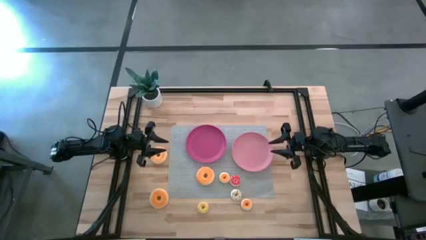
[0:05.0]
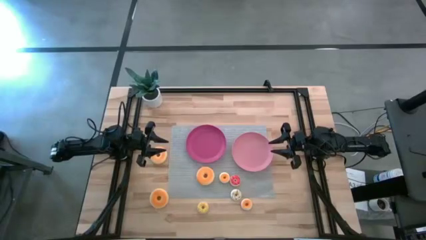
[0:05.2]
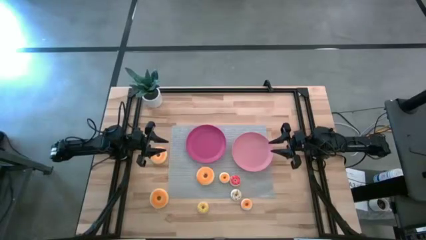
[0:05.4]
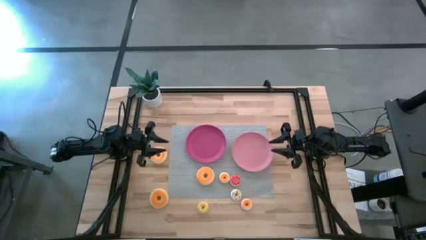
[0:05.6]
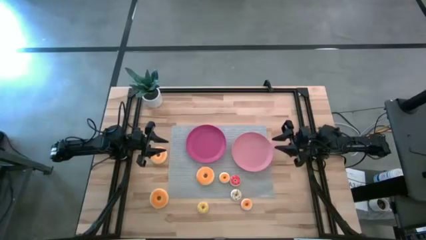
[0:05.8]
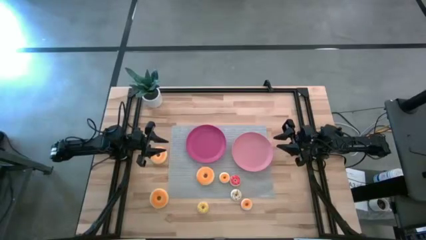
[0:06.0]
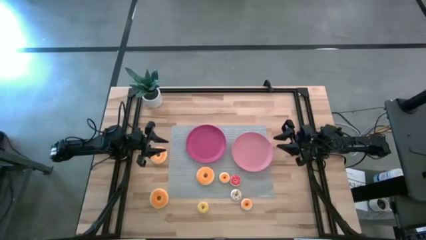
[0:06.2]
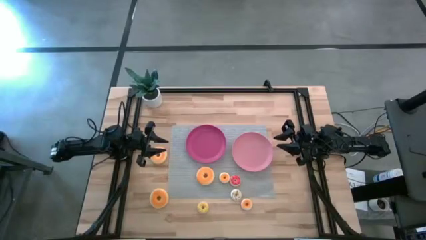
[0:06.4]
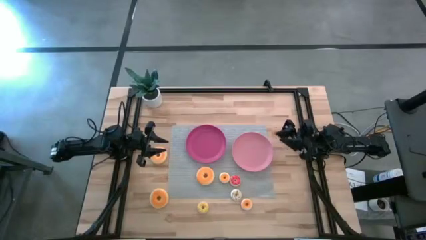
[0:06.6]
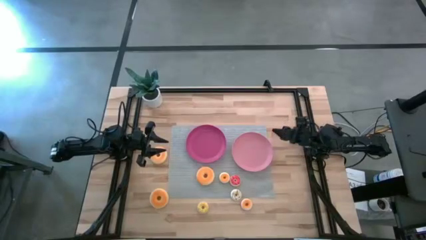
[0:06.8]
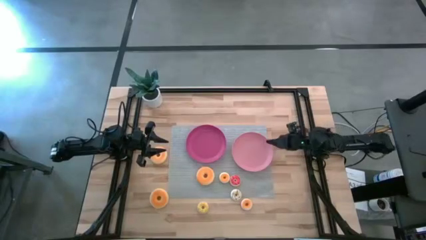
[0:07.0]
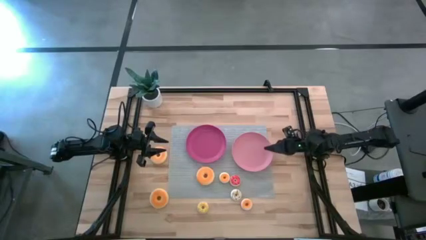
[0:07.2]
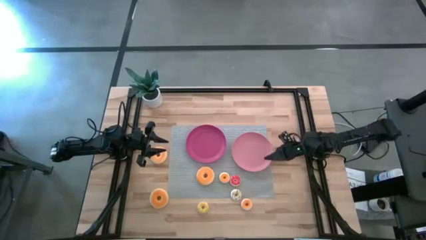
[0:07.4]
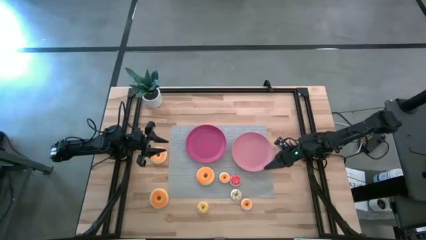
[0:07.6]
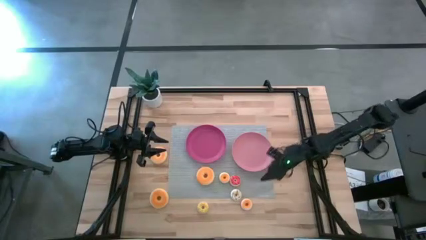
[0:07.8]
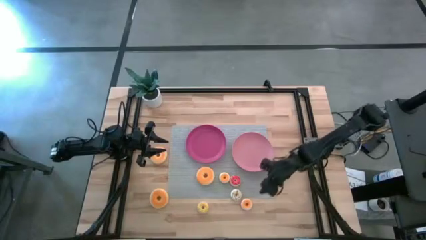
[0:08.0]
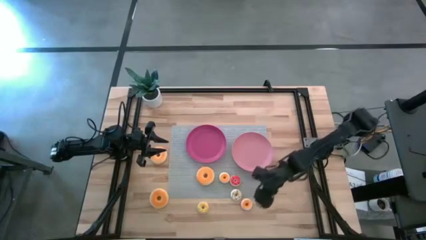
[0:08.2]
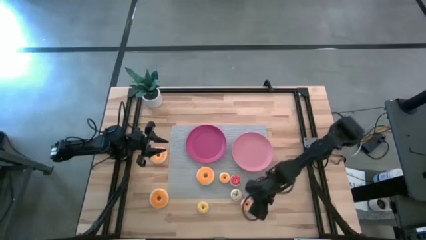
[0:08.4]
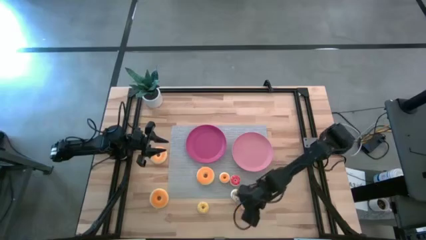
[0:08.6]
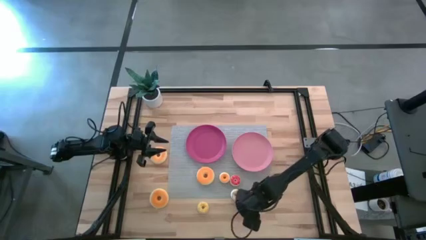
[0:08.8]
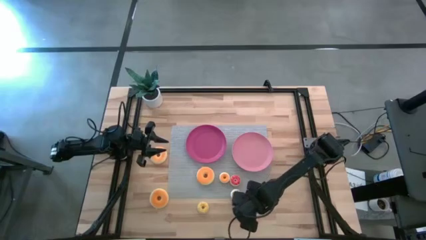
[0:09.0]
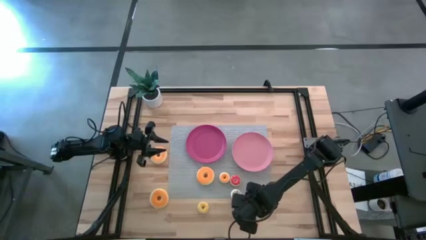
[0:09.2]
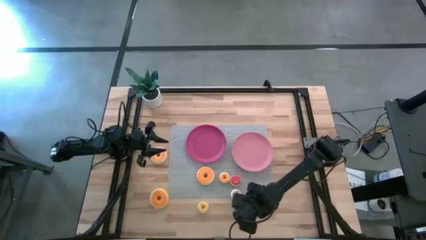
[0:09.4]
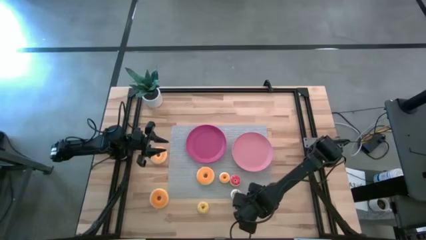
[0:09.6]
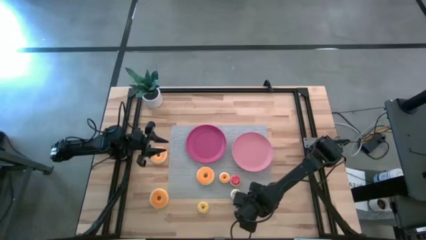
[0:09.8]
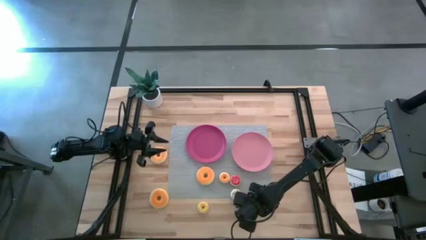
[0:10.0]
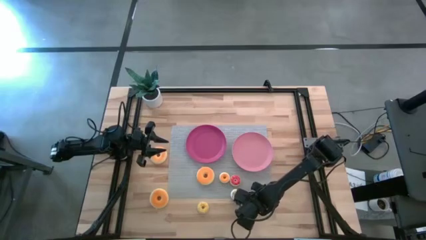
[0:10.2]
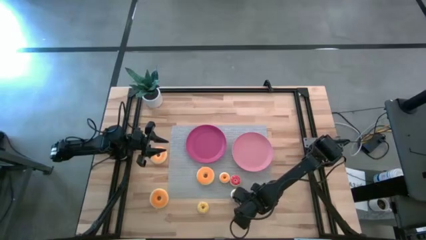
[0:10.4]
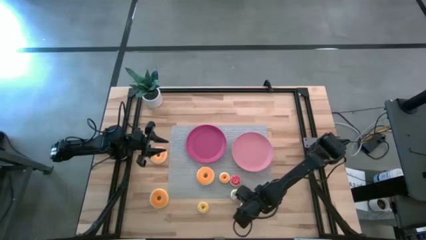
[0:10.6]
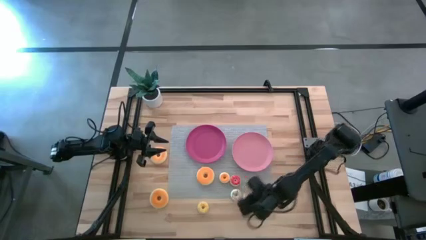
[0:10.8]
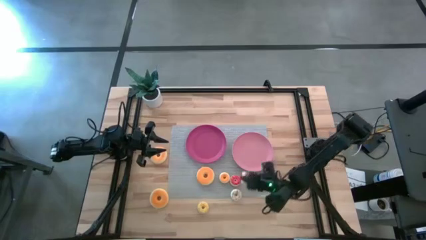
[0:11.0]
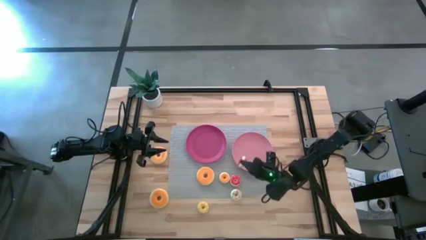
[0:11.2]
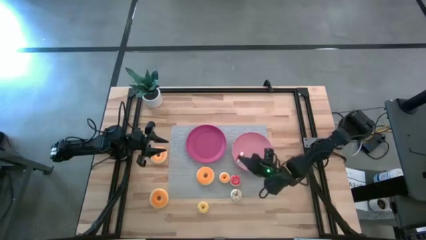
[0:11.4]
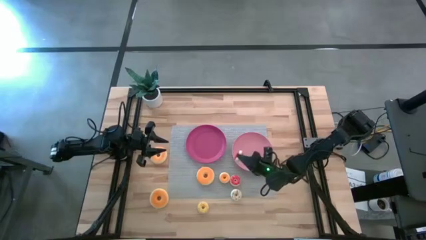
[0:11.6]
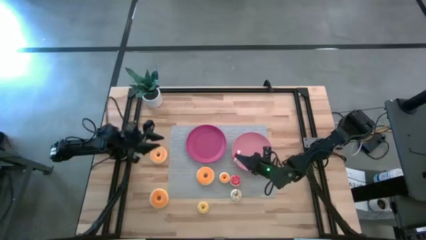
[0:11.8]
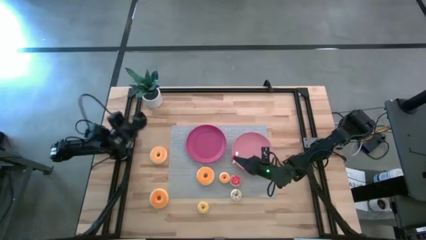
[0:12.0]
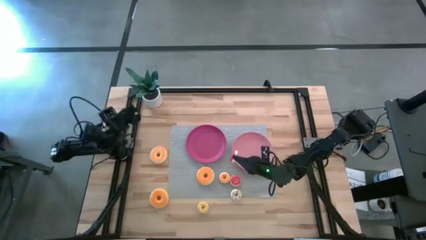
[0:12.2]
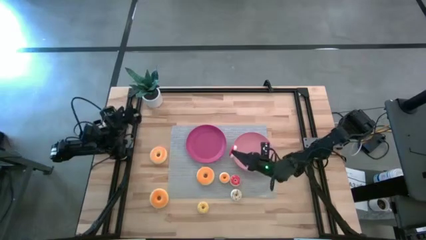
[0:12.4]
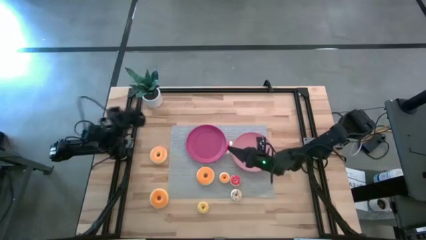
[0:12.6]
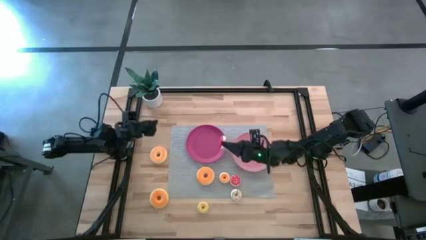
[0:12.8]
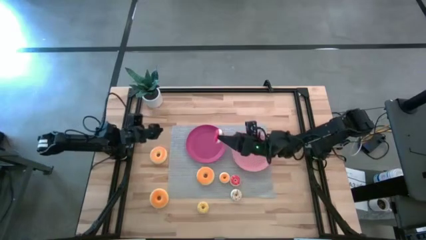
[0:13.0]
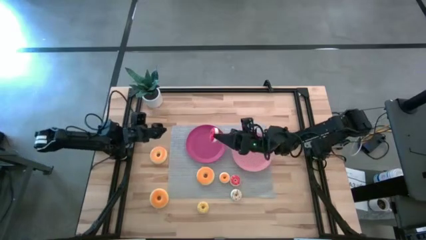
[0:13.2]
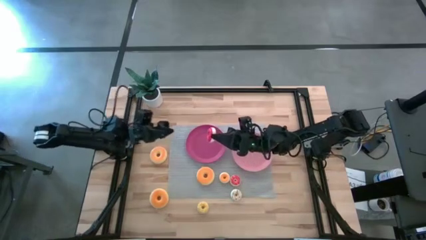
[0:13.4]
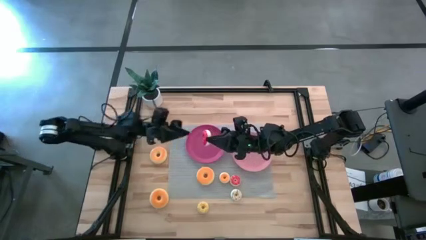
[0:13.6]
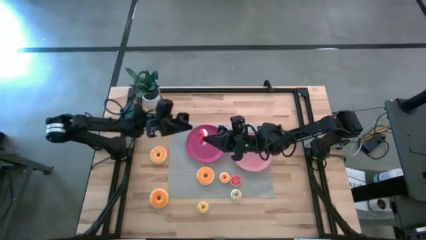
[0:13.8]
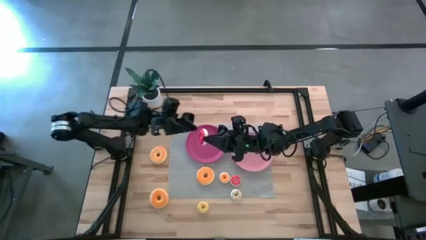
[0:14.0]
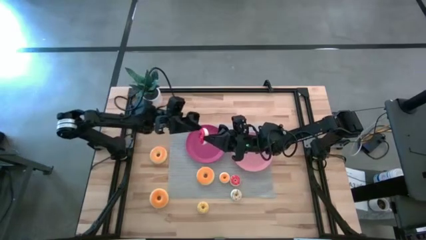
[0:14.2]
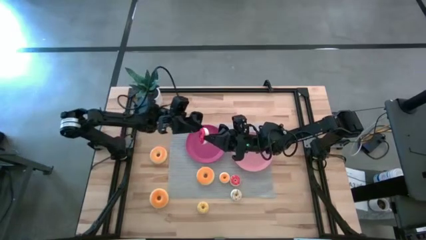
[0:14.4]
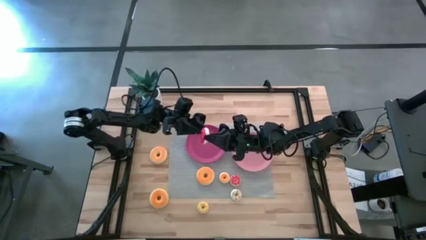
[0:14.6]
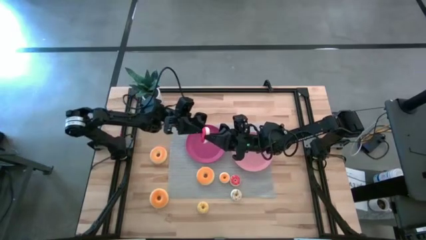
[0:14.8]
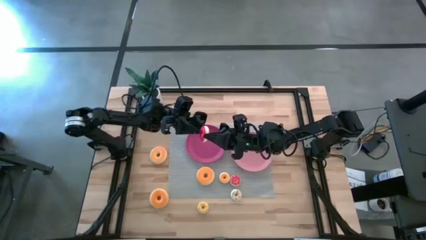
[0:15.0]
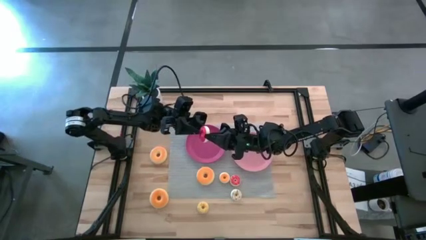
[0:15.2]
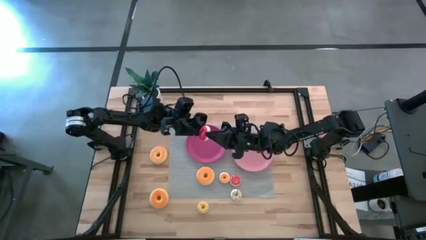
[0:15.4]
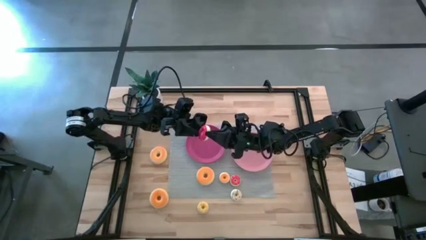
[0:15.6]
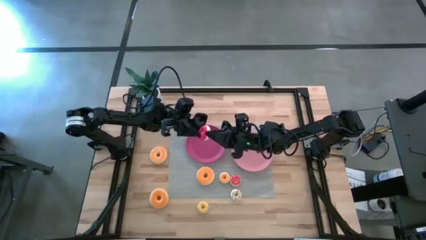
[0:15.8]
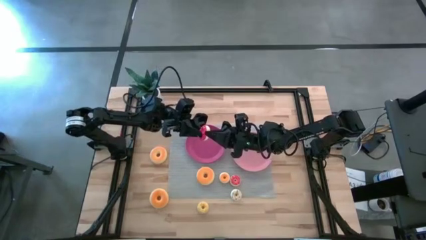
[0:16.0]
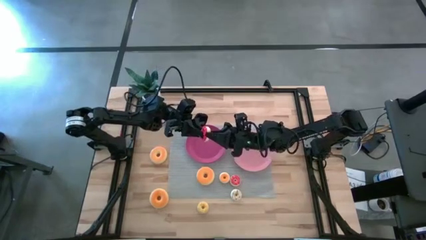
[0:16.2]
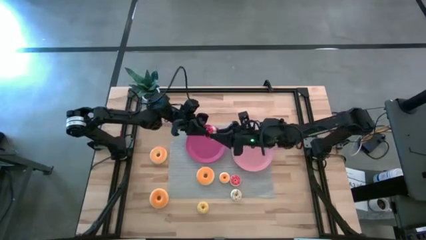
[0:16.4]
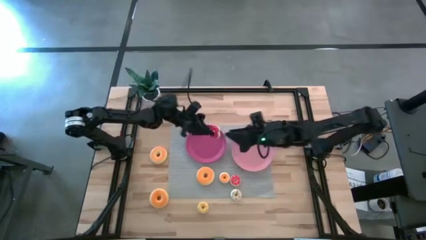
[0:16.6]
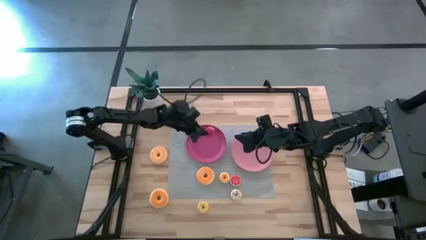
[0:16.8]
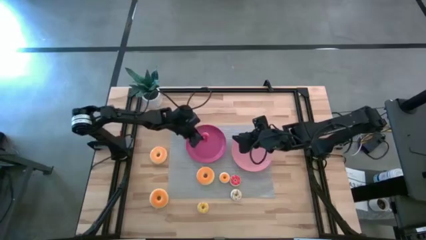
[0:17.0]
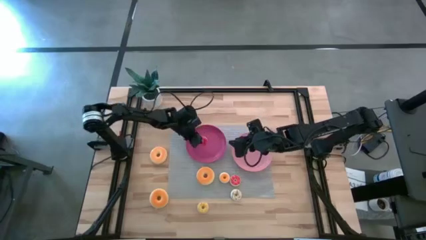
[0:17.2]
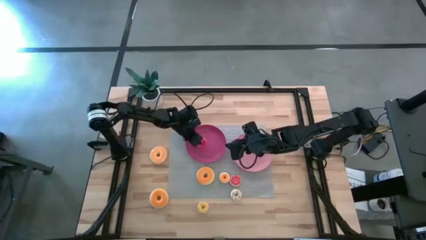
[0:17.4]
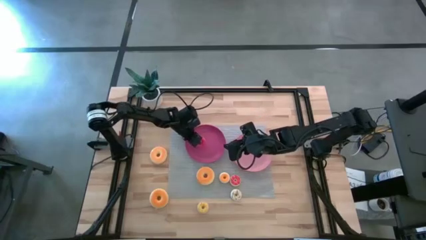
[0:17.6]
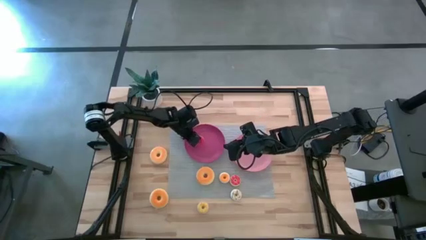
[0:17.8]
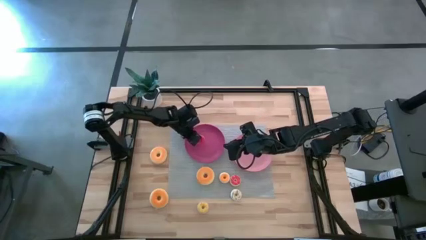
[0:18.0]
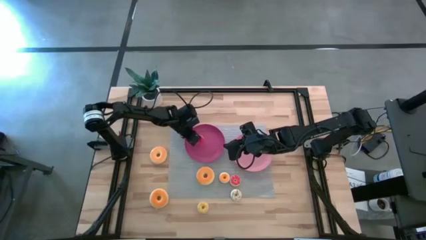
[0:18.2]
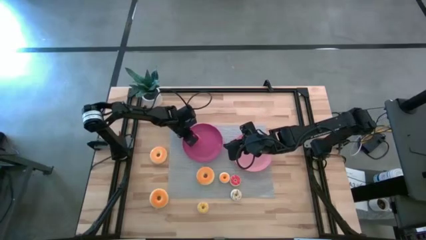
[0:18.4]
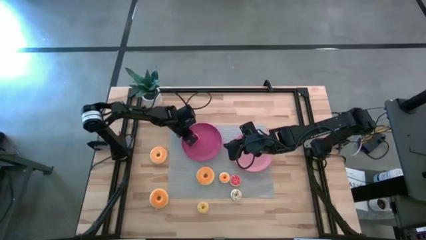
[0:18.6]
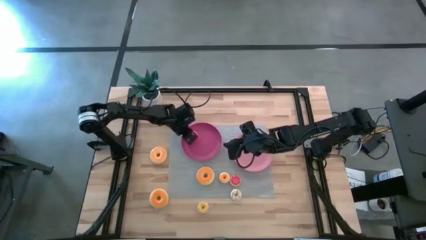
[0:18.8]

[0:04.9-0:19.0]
Task: Pick & Place donuts
Put the small red donut on the pink plate

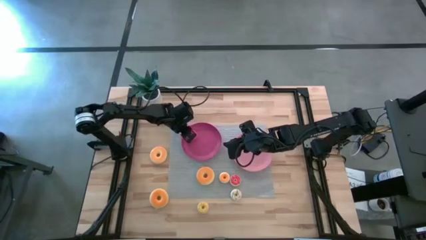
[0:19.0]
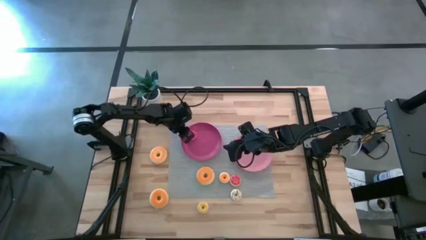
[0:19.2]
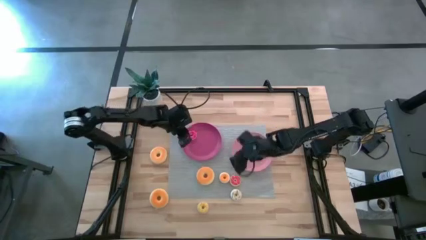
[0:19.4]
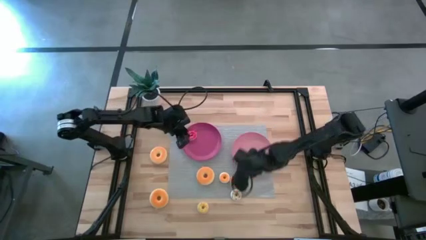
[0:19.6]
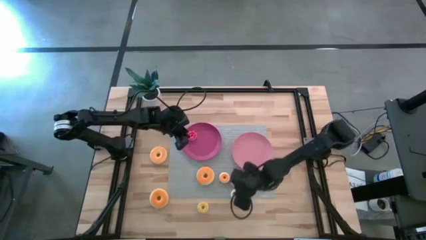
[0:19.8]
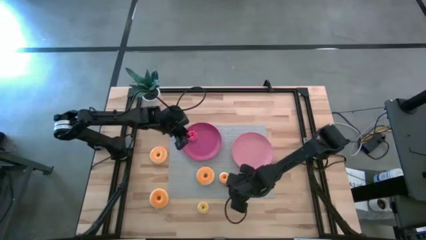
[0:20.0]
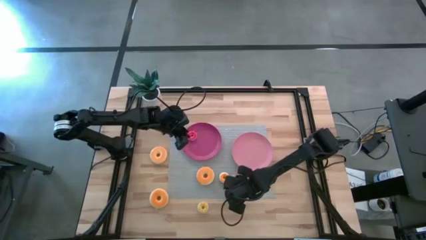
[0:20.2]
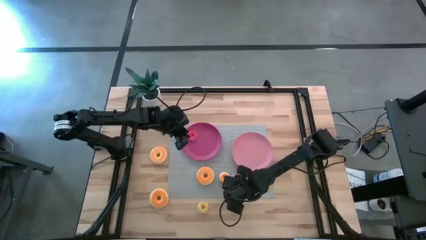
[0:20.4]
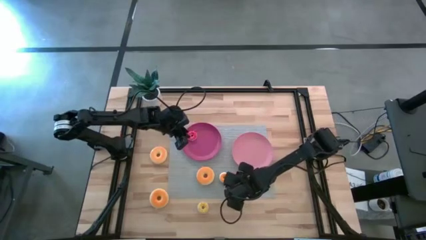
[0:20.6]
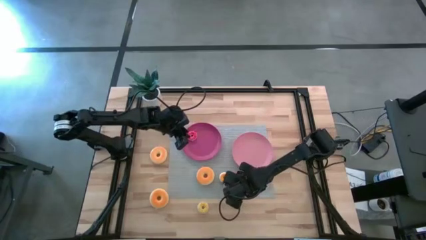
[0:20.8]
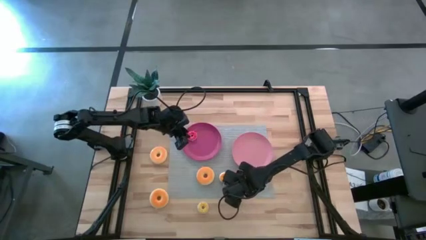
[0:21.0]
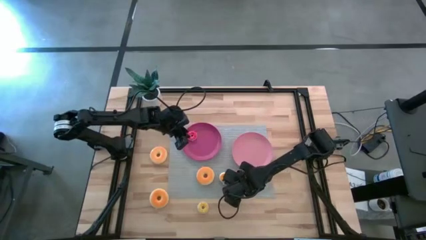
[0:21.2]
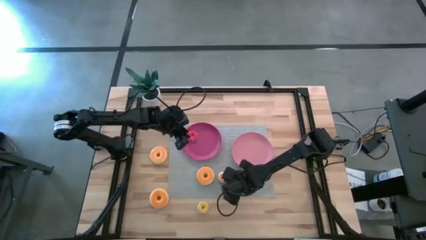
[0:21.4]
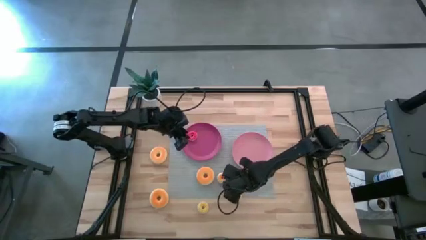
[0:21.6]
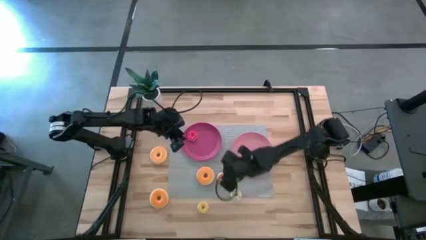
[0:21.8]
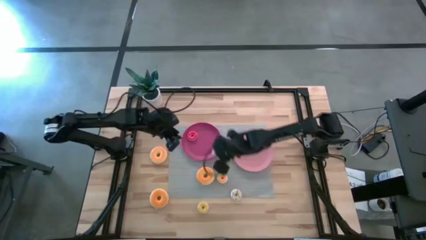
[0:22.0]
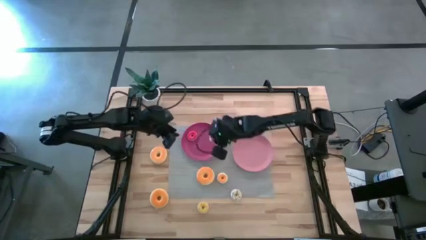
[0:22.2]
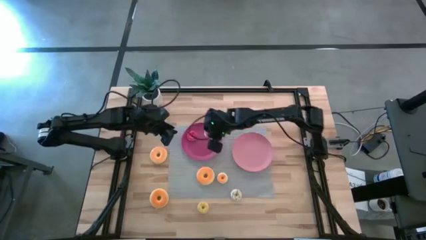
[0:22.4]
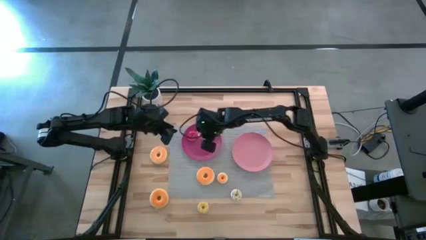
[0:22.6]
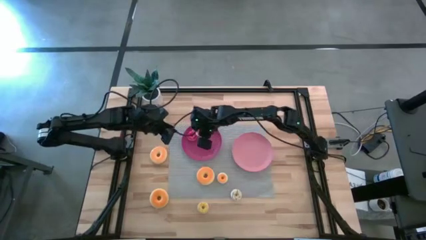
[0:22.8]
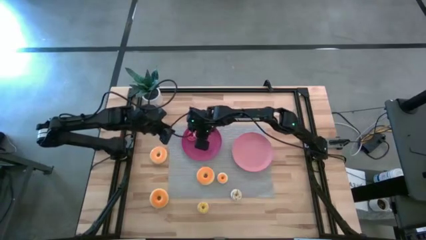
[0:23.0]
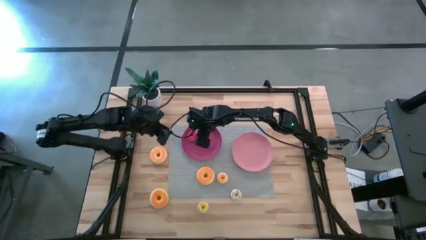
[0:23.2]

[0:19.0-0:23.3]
Put the small red donut on the pink plate
